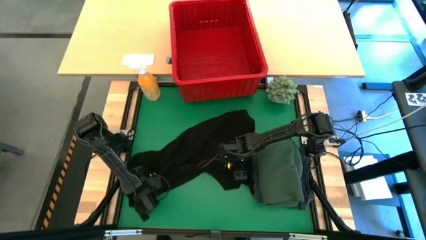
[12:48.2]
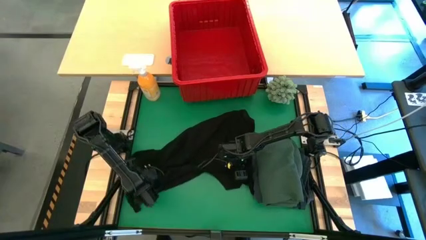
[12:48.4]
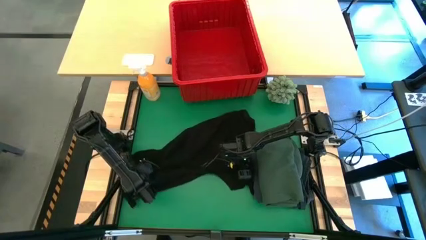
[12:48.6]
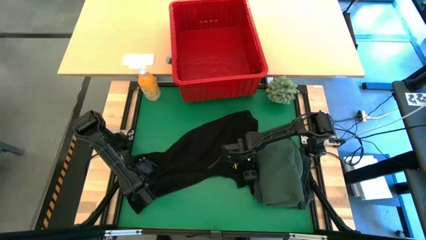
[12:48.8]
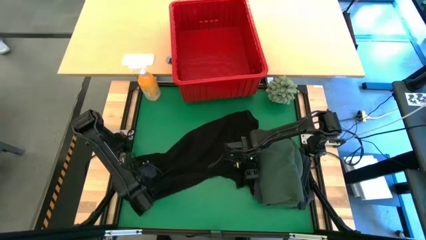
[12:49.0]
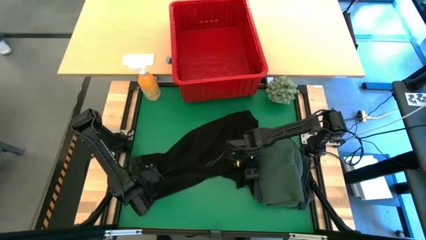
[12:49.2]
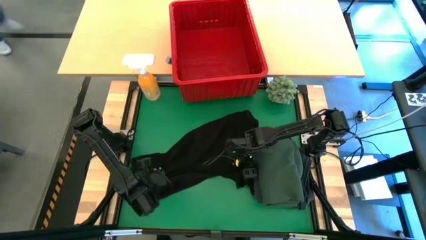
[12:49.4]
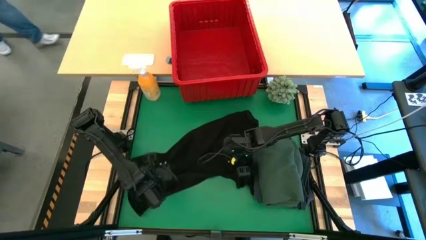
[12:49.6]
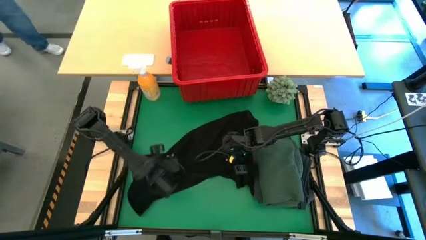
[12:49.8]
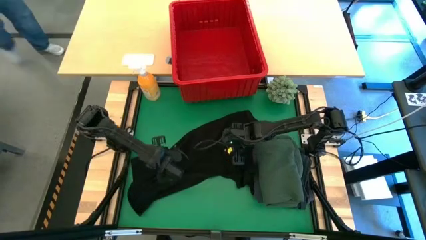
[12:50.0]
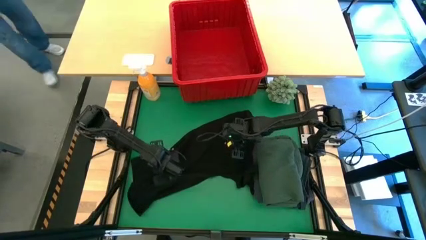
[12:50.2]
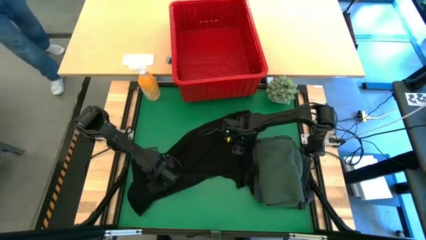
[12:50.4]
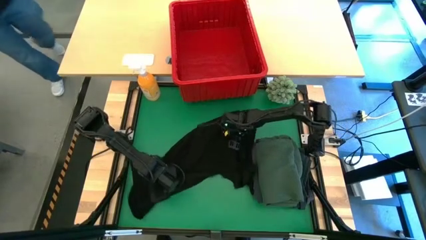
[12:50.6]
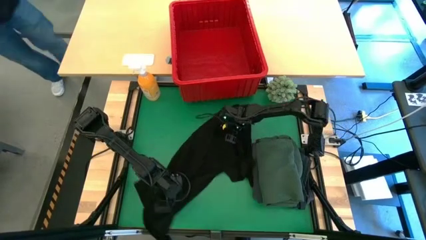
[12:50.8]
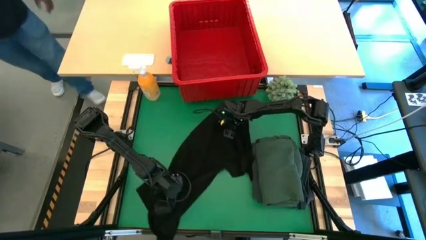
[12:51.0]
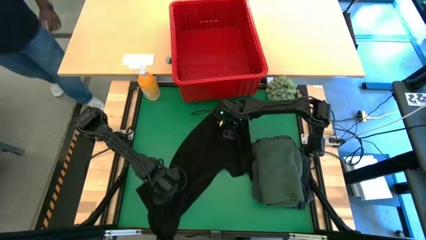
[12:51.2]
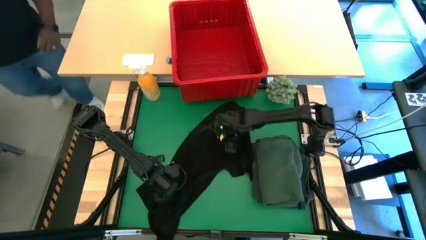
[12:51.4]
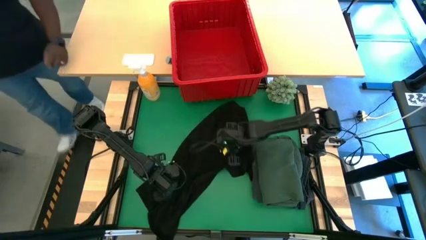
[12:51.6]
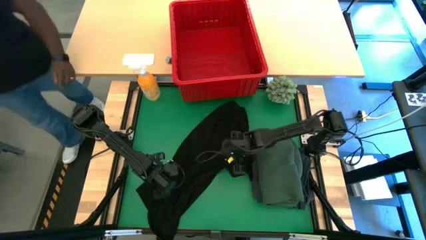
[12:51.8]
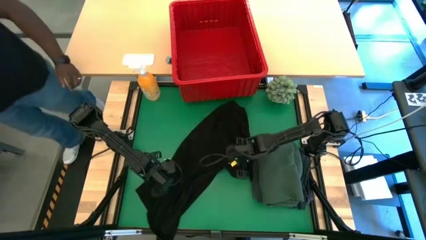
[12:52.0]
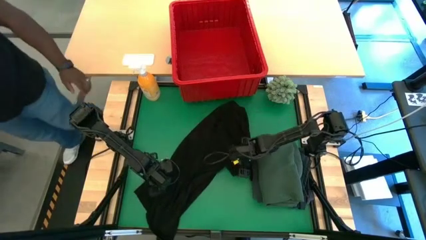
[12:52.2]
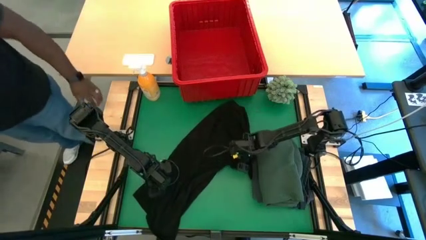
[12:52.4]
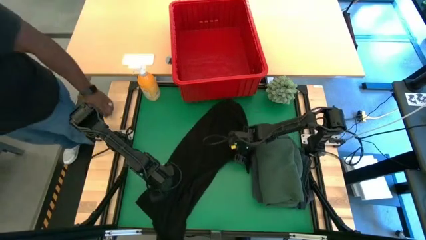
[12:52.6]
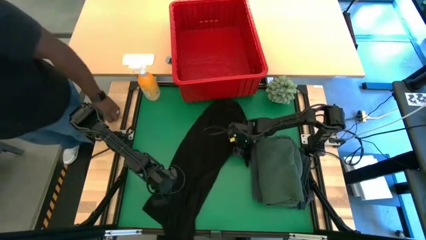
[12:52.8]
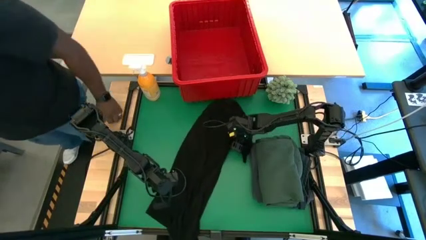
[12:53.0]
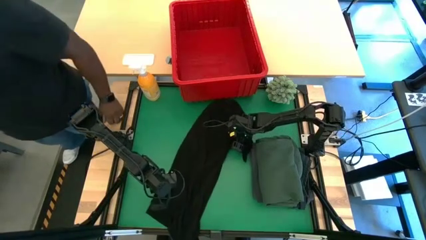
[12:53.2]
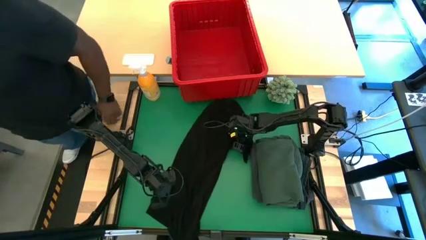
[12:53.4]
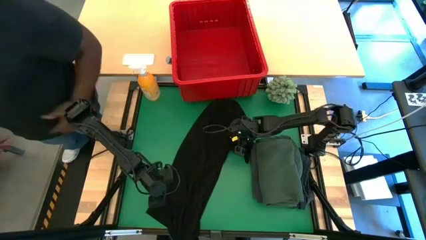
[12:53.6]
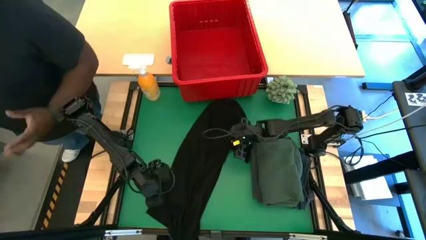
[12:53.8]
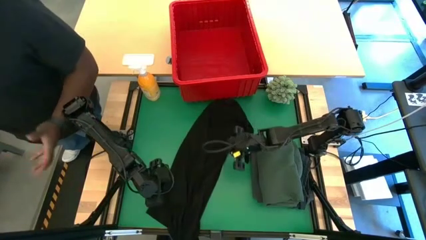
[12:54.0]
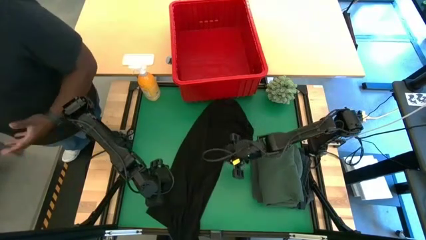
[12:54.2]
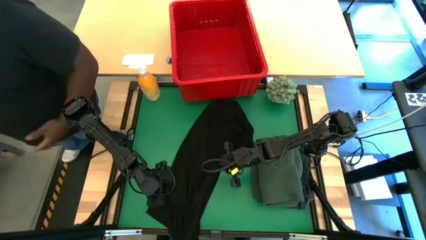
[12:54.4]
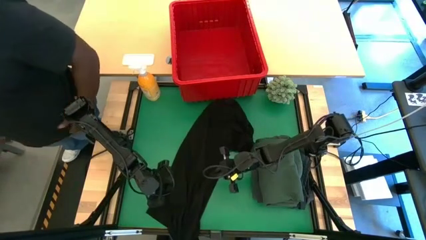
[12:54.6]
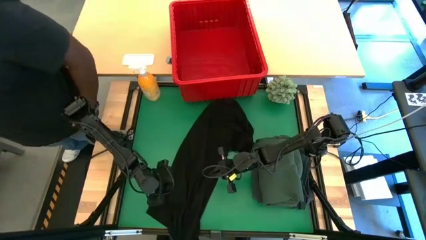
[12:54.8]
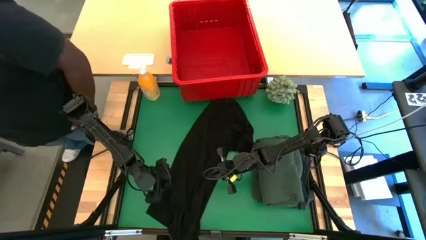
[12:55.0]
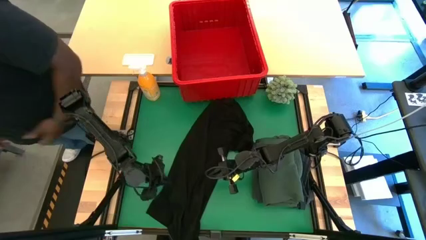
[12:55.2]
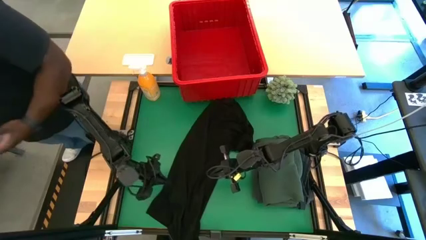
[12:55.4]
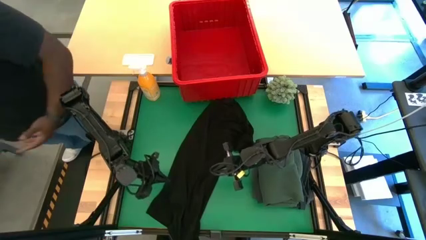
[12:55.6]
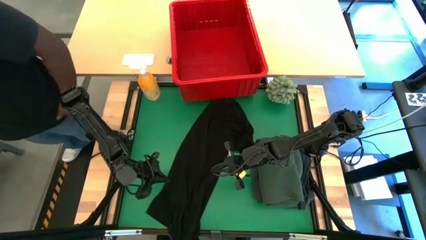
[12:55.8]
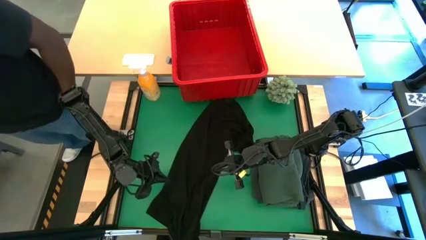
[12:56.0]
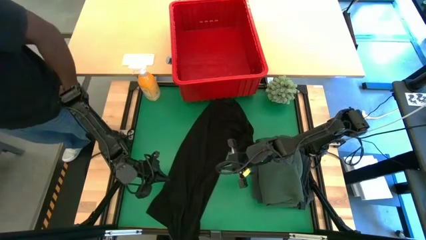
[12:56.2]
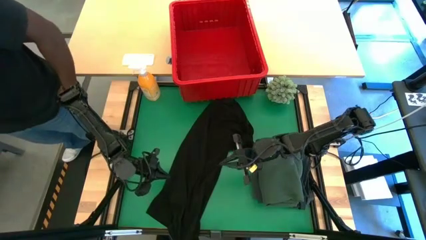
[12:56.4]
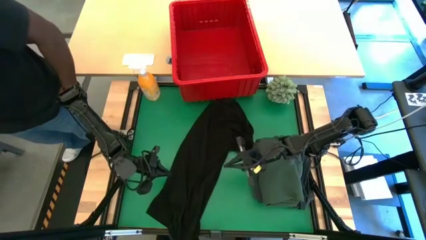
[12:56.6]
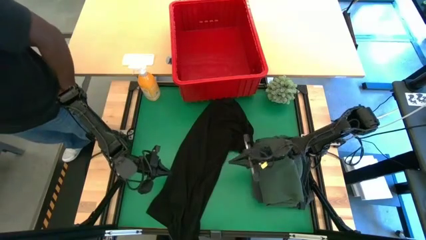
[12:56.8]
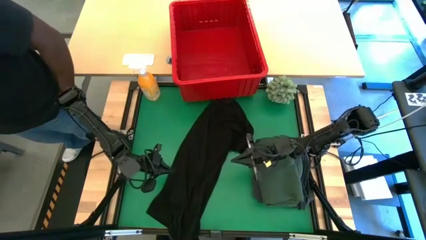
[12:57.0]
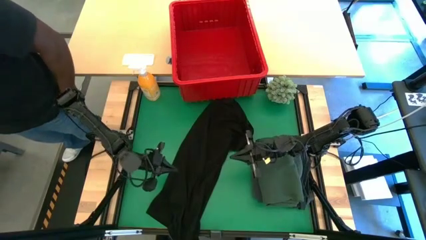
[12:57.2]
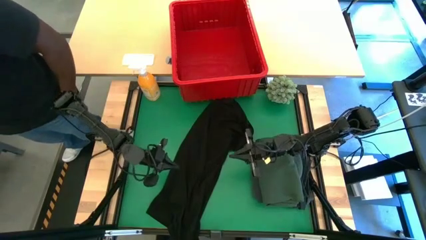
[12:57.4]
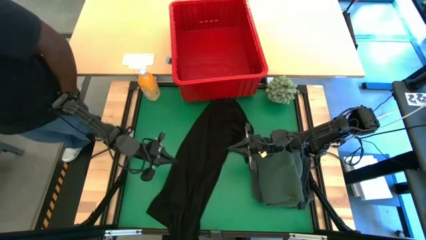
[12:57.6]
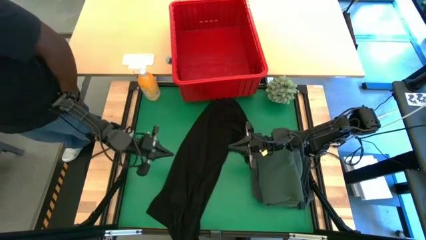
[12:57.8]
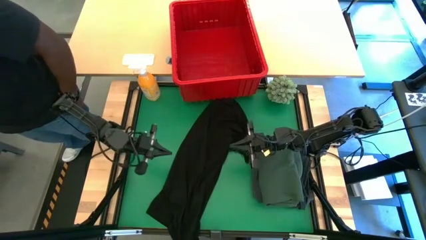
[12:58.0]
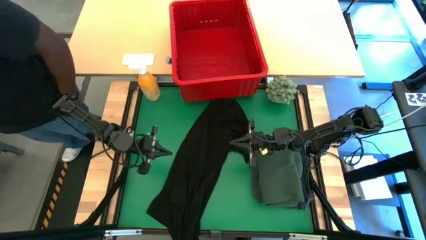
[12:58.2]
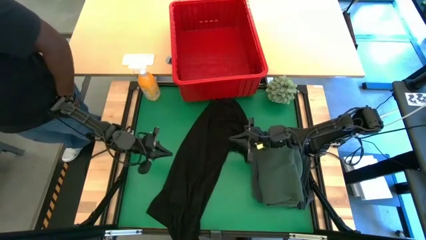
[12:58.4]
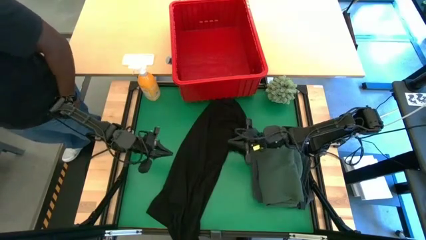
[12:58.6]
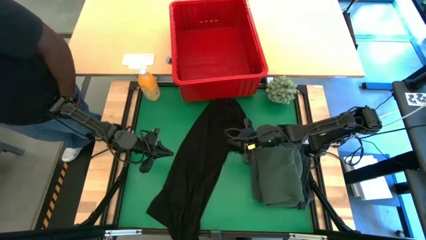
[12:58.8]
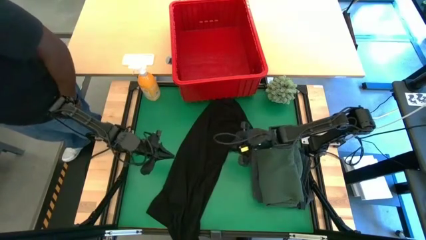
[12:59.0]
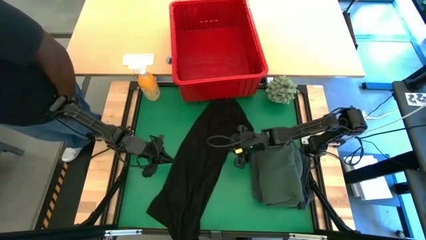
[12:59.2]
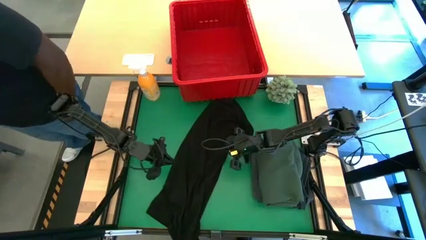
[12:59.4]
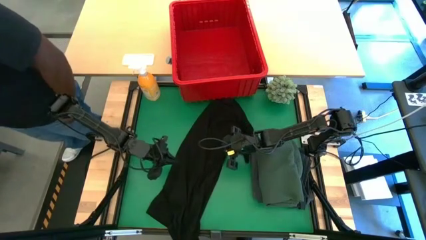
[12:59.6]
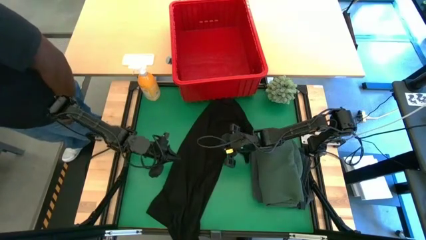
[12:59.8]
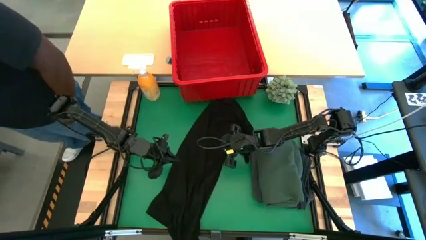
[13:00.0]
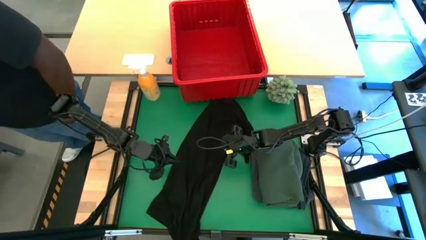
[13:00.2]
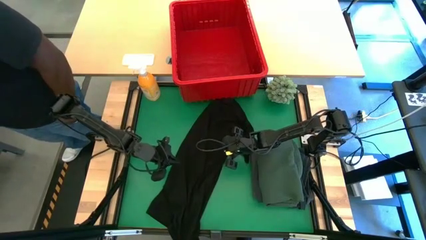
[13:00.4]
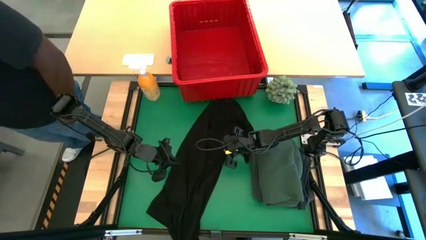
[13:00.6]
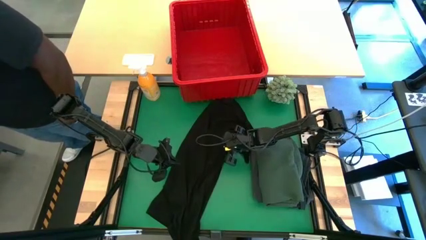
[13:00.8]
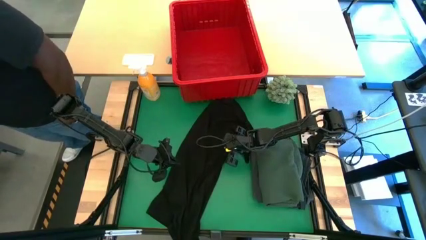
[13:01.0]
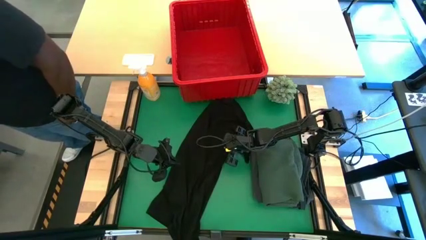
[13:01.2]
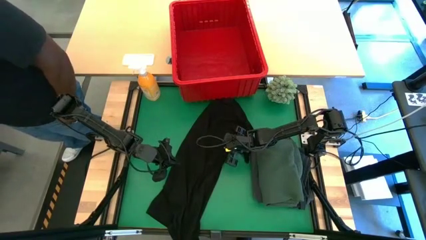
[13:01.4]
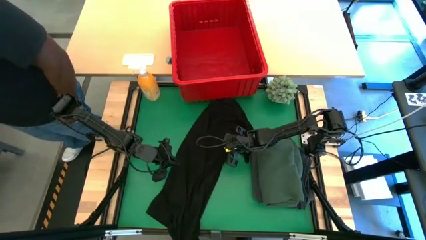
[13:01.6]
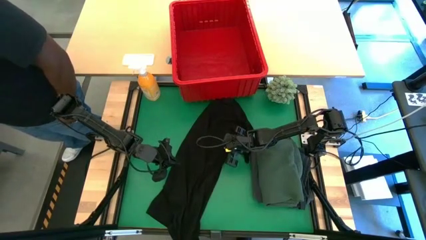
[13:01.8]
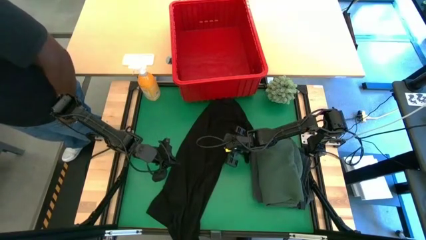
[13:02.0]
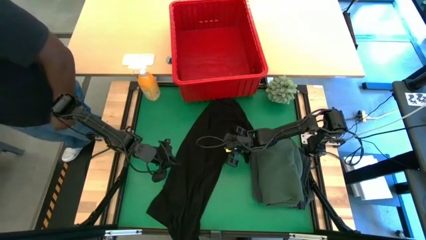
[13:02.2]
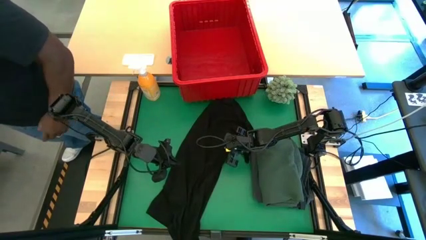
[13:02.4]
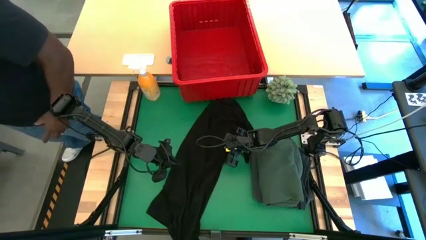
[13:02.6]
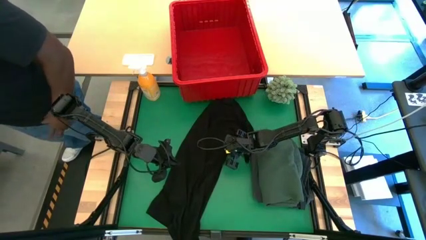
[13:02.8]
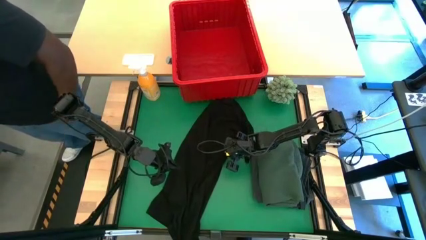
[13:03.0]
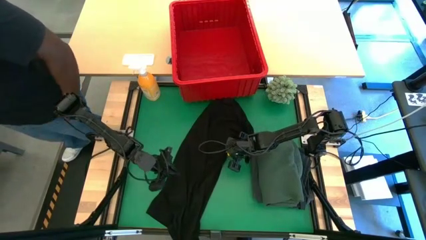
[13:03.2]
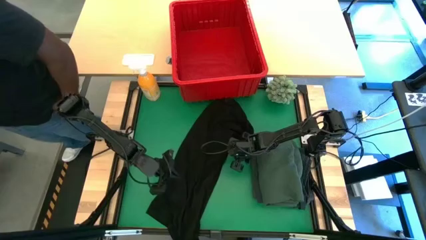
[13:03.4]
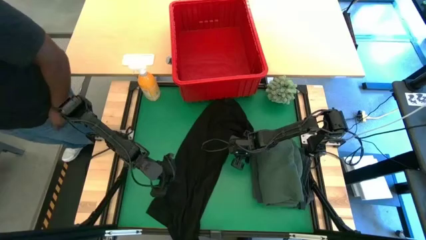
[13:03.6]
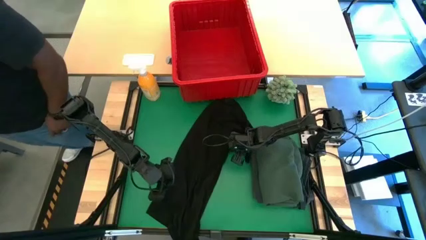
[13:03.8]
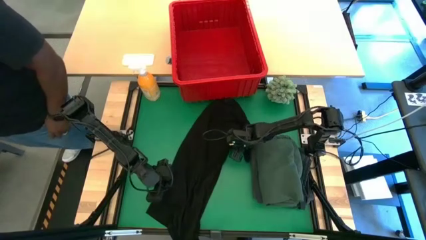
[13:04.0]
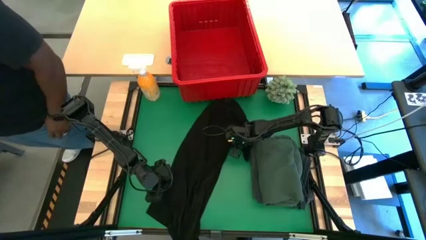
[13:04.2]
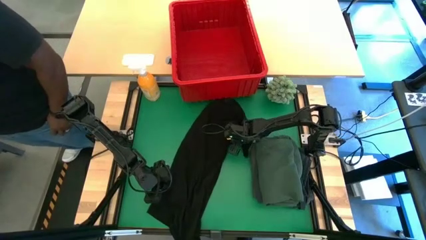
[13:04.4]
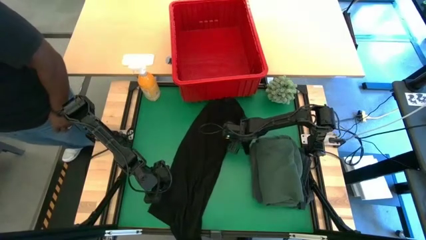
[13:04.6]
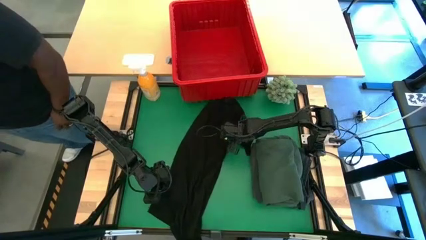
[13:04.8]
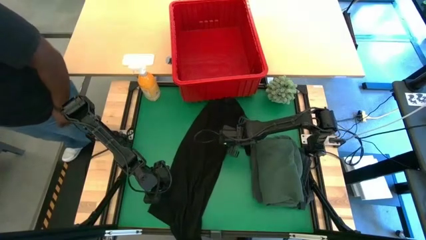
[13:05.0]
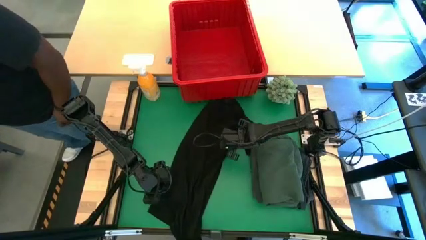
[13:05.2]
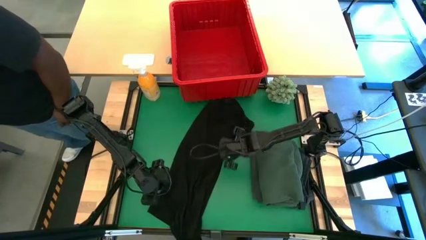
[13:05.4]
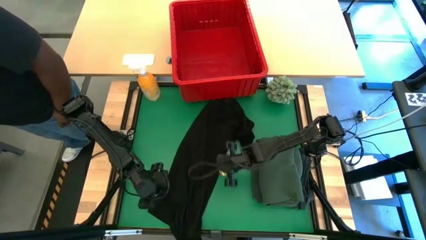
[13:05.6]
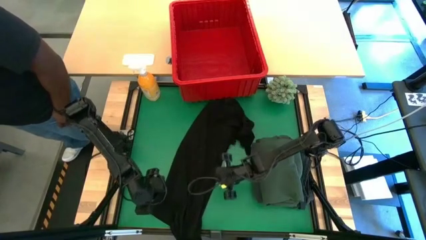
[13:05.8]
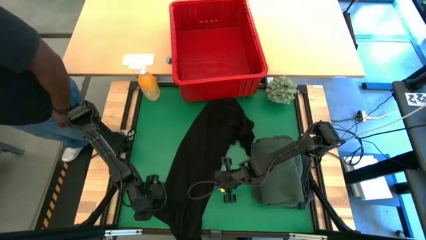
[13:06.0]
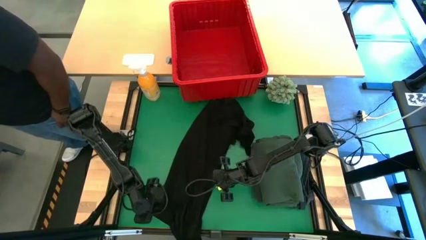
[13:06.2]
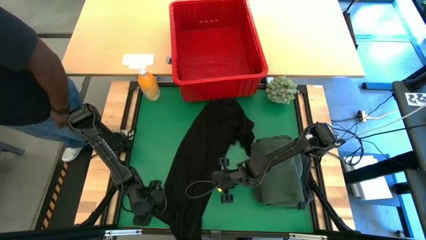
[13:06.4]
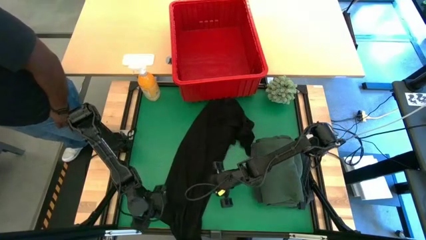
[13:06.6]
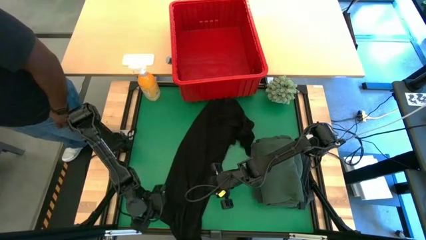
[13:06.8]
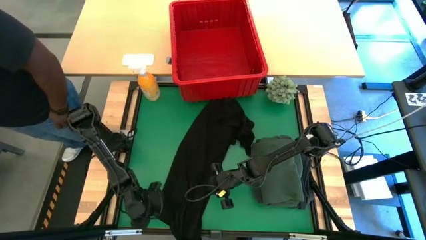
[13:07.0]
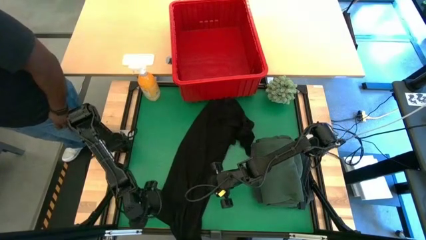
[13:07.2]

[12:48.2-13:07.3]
Task: Fold Laundry from Bin
Fold the black shirt
